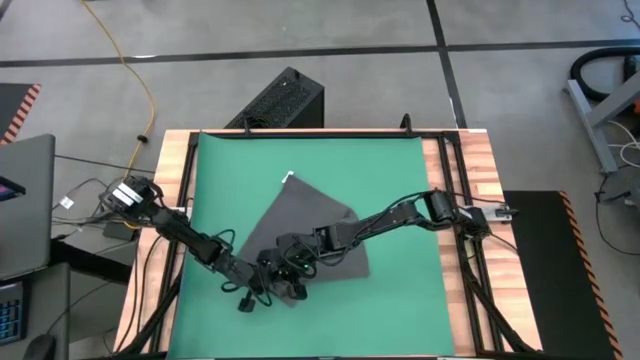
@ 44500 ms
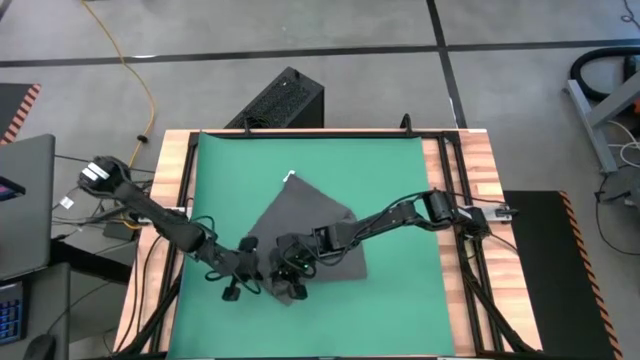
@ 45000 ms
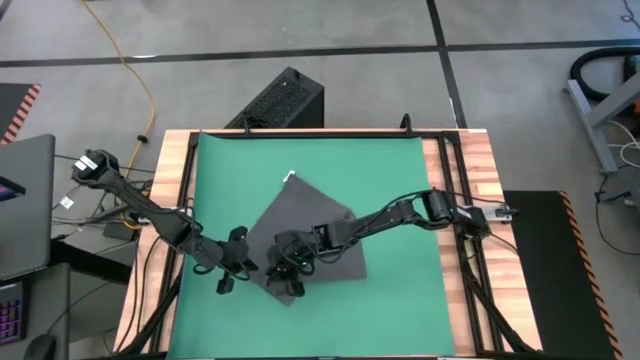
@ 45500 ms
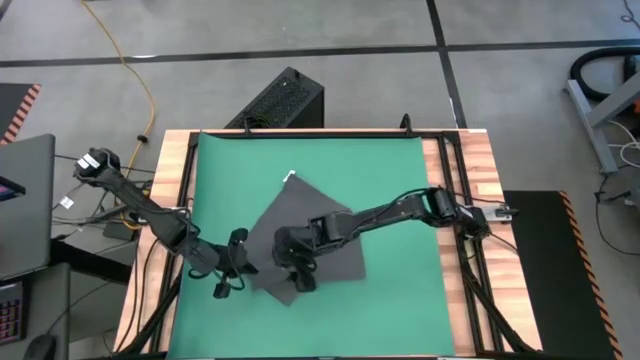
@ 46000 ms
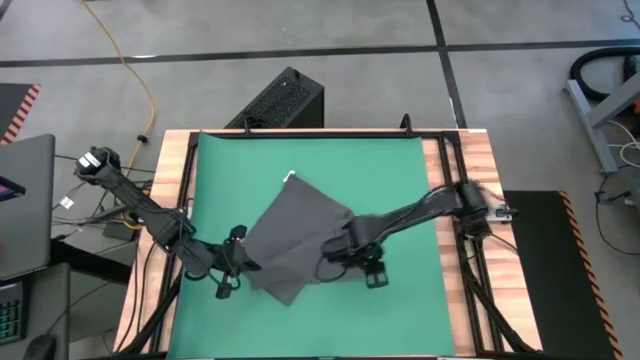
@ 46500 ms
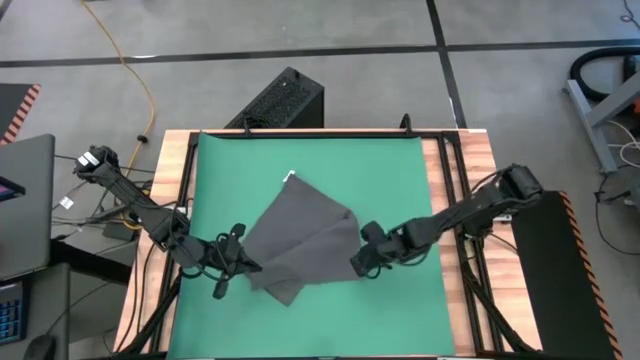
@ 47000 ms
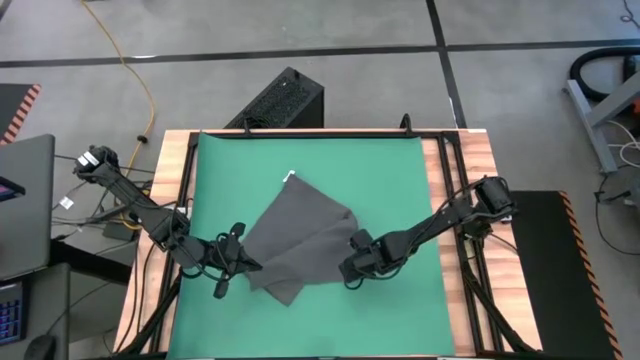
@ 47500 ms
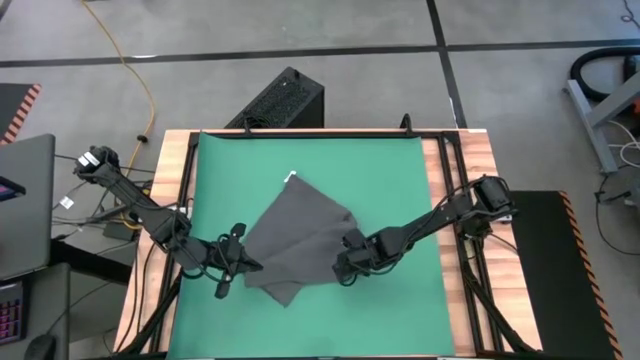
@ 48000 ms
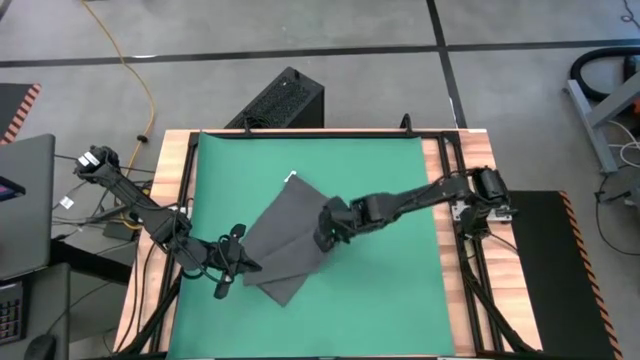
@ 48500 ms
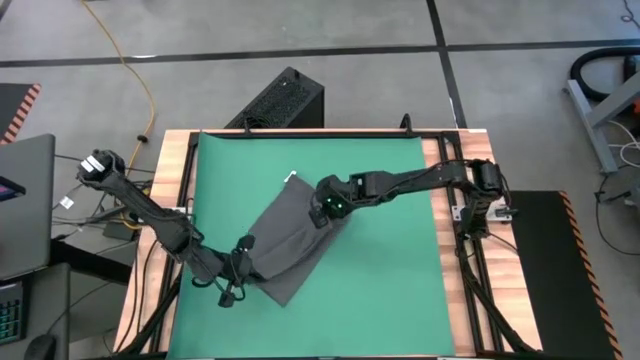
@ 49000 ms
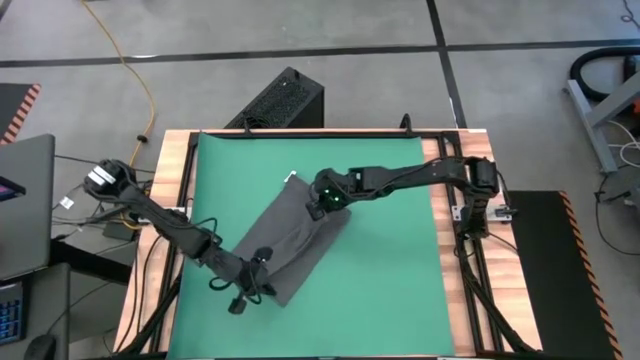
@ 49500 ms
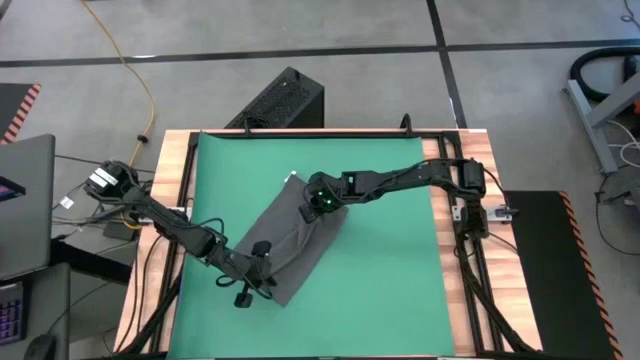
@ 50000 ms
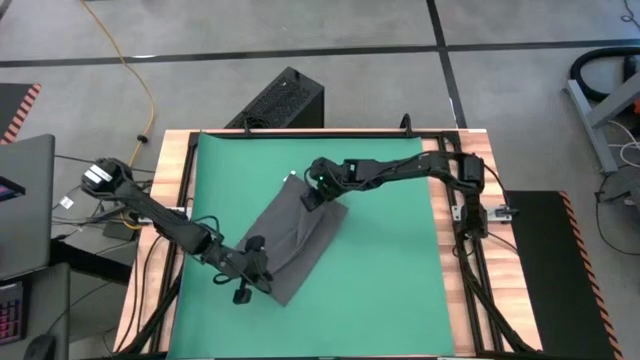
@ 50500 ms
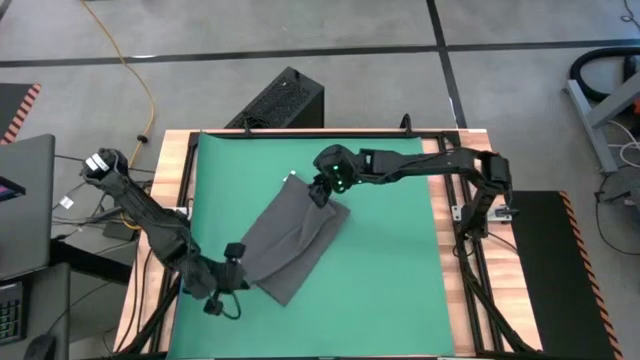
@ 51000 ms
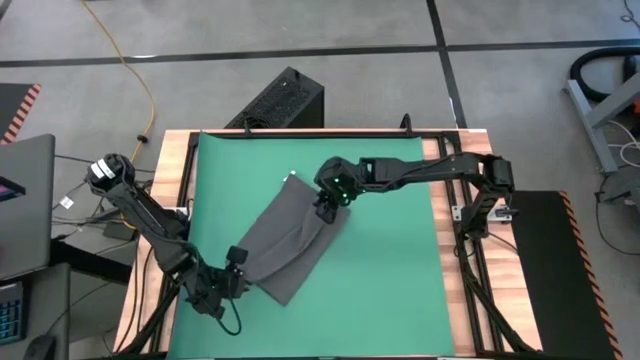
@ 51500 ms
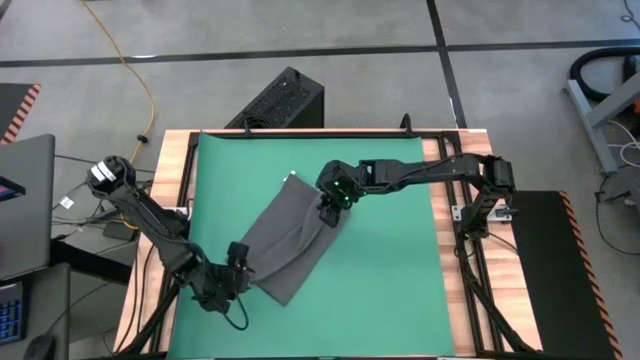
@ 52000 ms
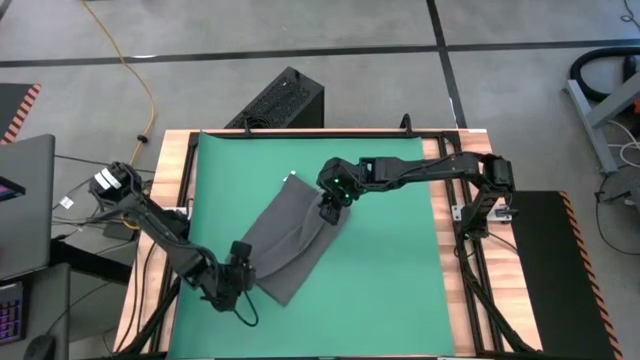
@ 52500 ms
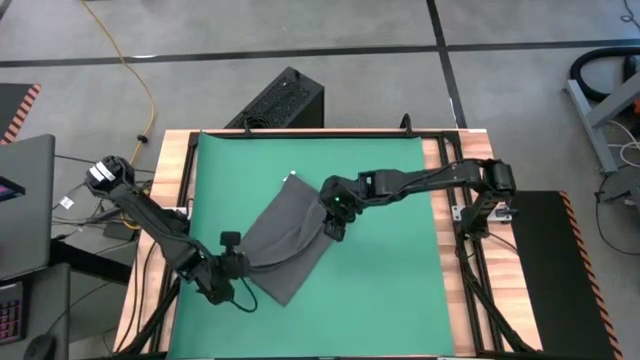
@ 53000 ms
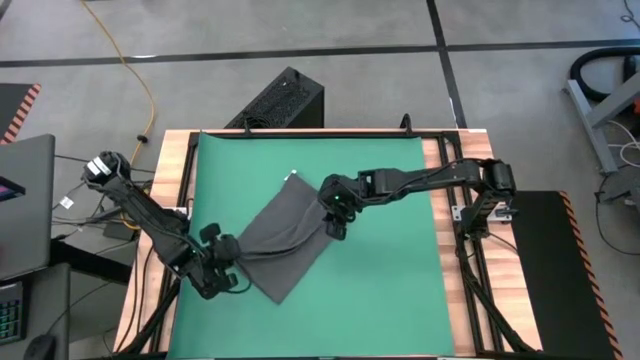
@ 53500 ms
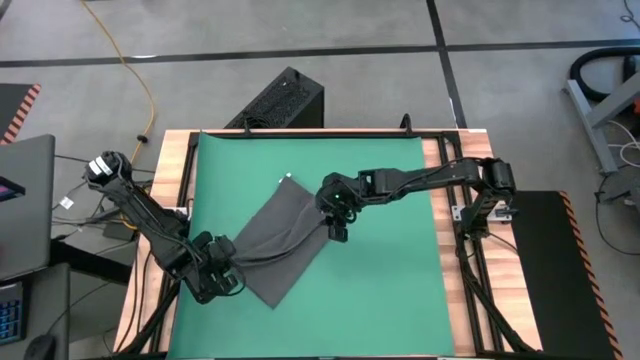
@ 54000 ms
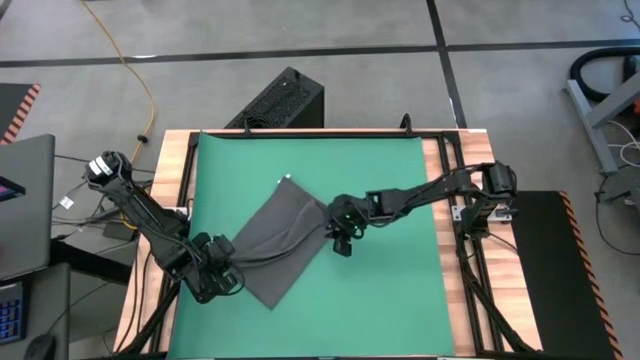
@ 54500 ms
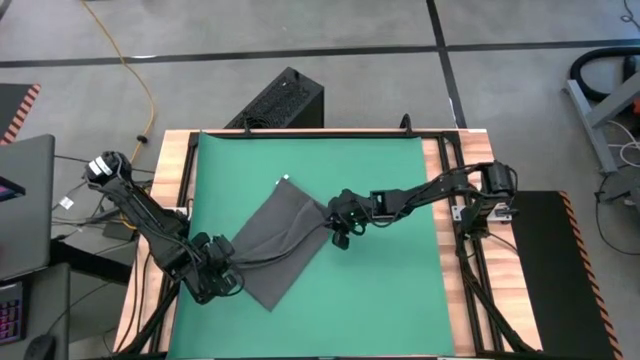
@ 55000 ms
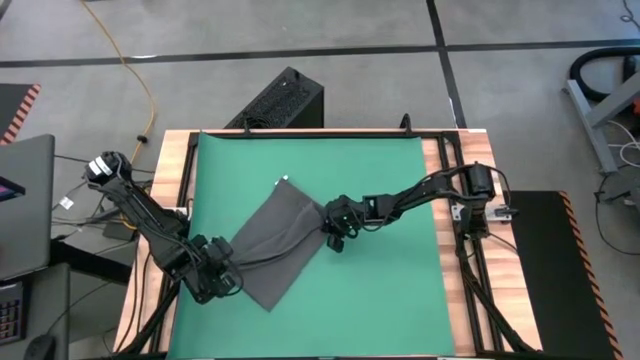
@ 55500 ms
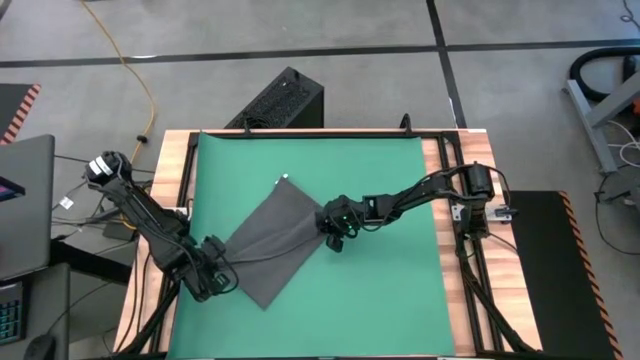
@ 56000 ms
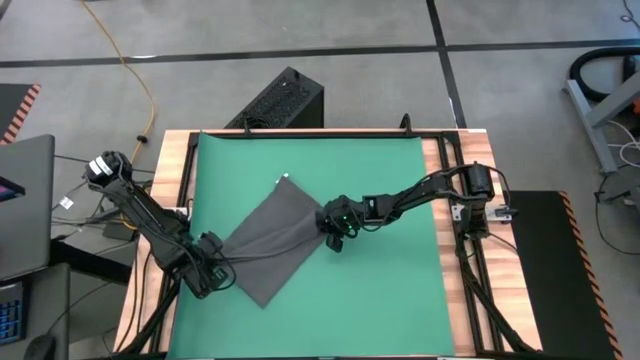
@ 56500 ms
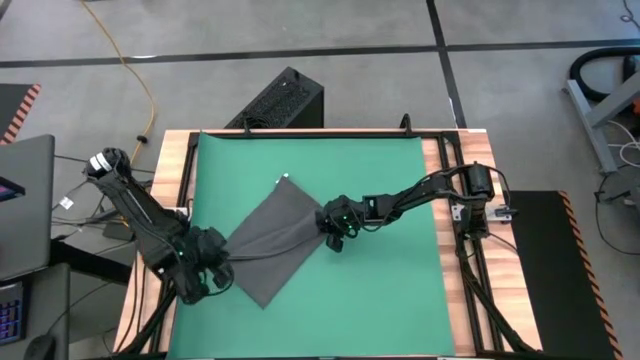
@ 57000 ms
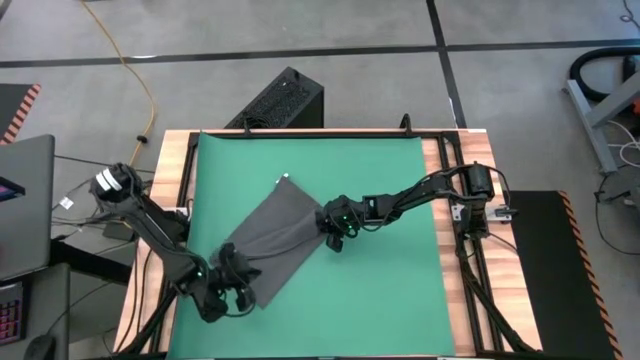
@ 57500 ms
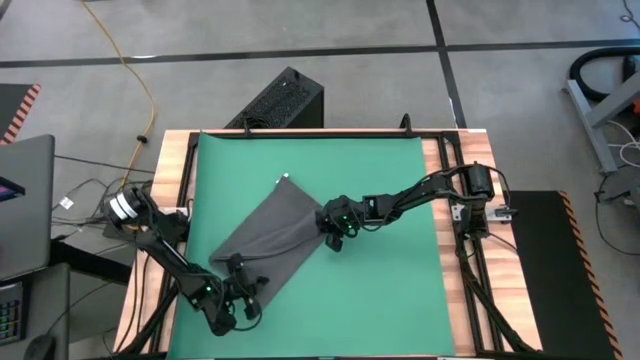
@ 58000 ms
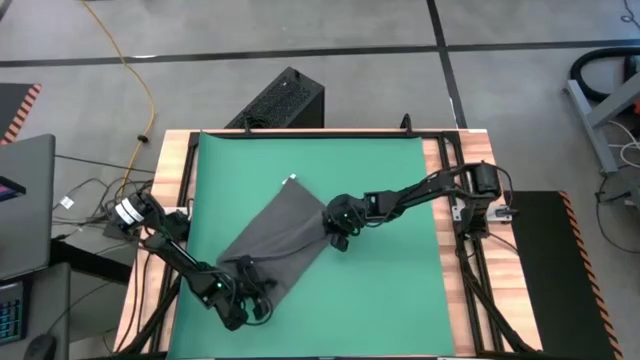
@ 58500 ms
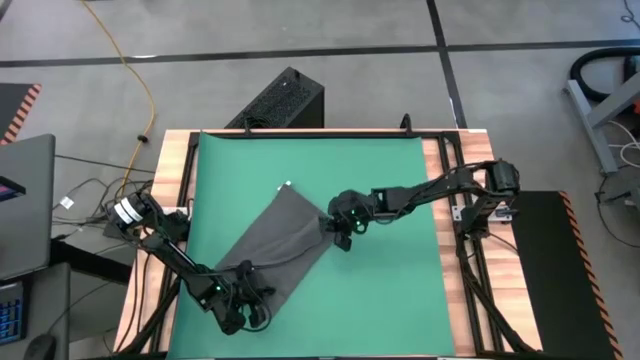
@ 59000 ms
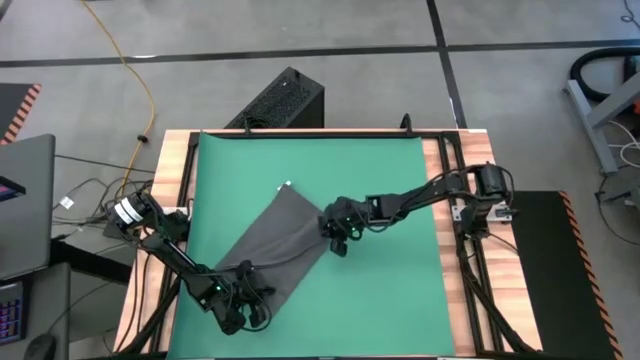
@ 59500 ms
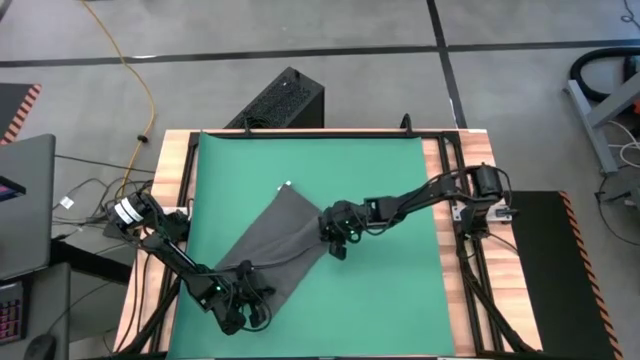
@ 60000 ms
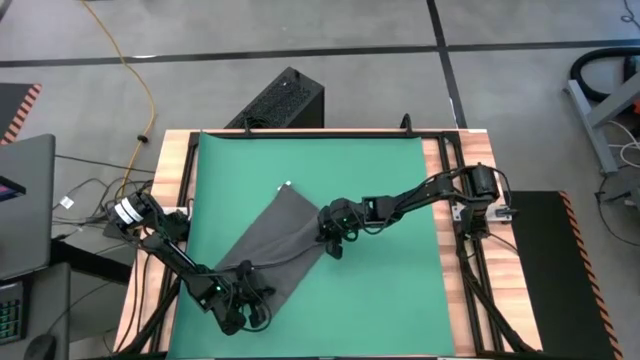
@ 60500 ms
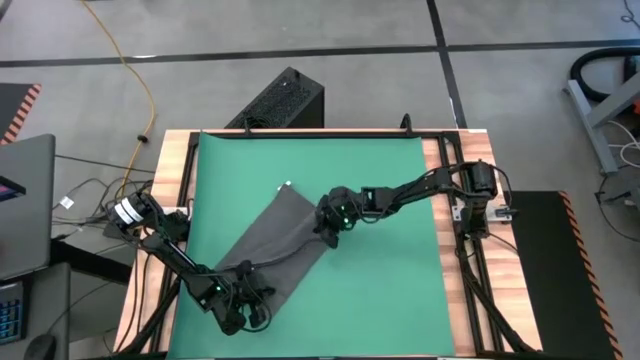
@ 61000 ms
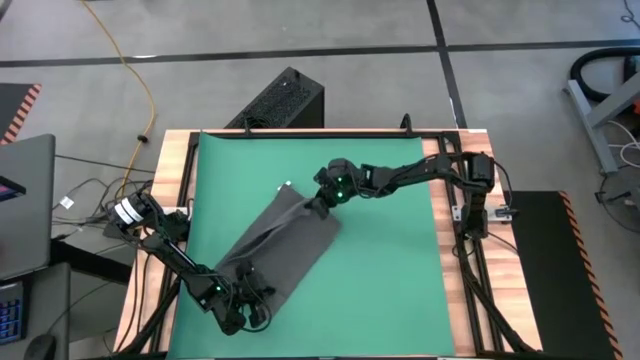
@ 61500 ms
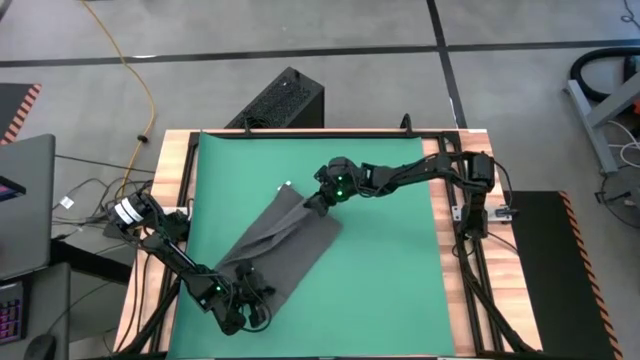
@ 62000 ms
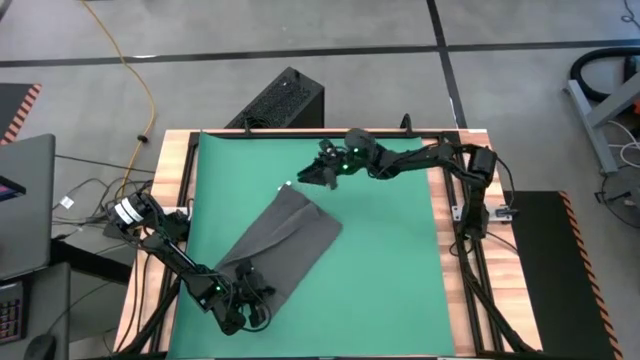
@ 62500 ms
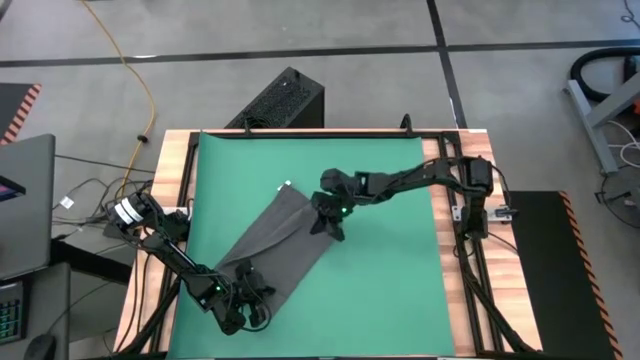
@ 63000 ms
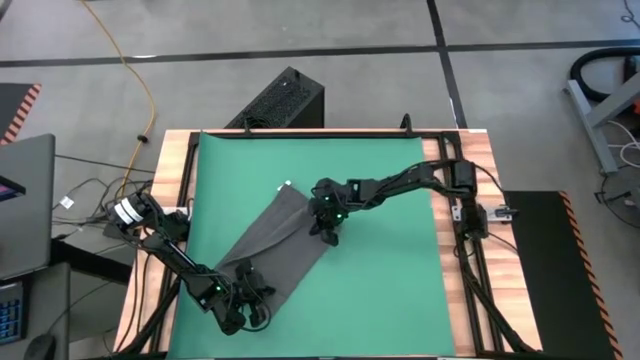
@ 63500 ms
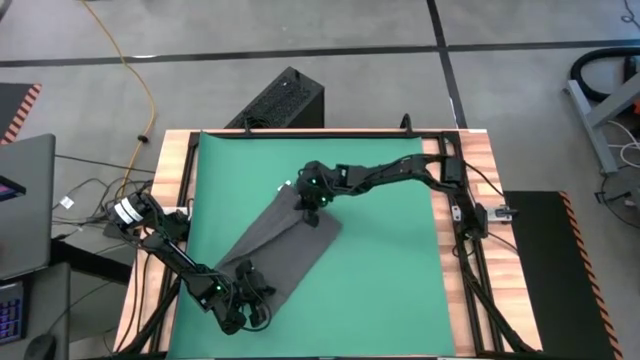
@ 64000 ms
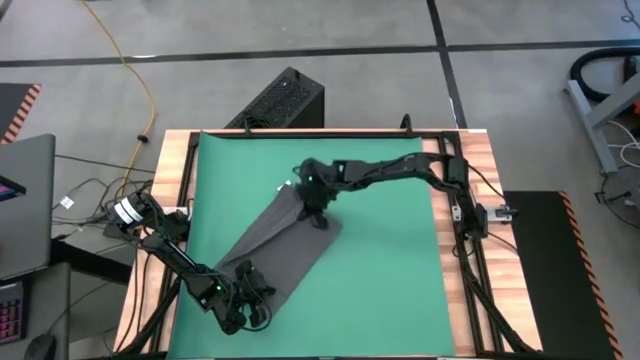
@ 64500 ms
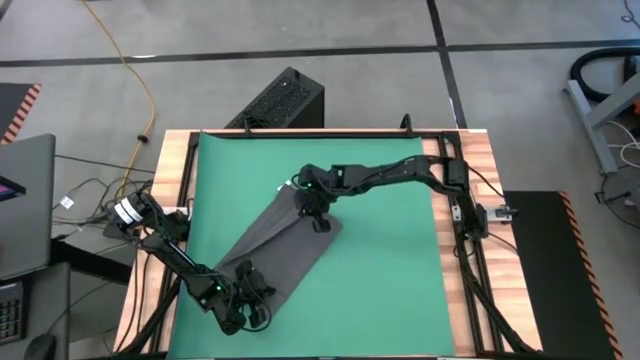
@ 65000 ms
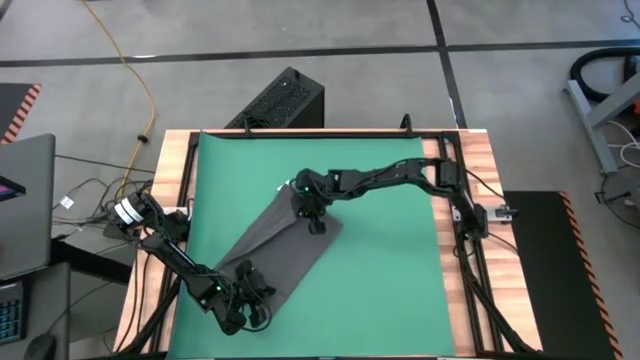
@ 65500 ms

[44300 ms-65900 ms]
Task: Roll towel into tight, uniform cylinder
Roll the gray towel
